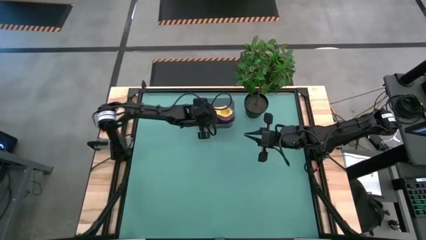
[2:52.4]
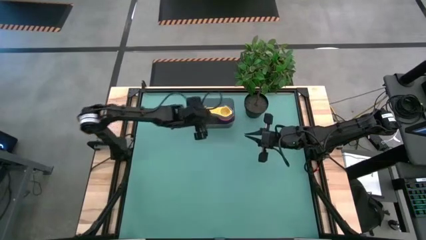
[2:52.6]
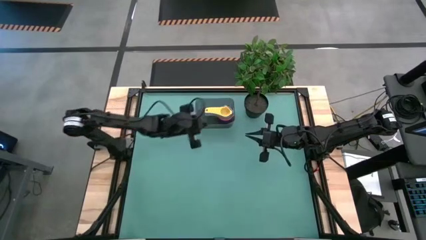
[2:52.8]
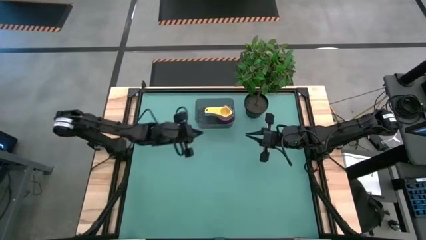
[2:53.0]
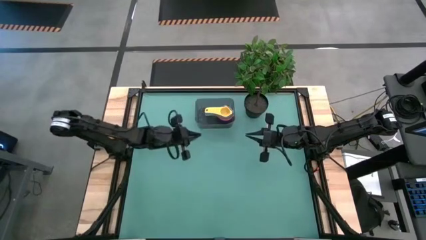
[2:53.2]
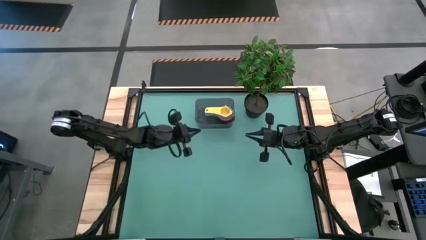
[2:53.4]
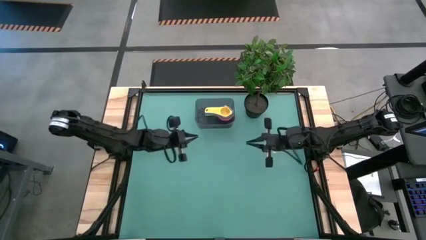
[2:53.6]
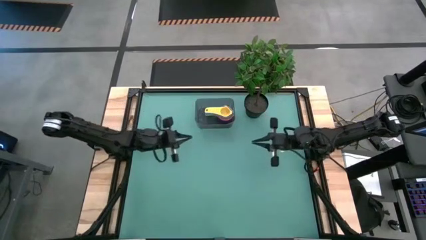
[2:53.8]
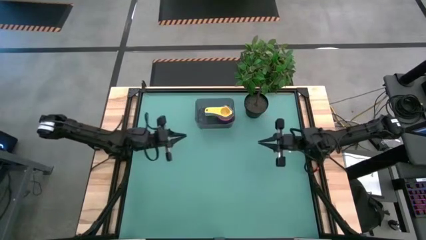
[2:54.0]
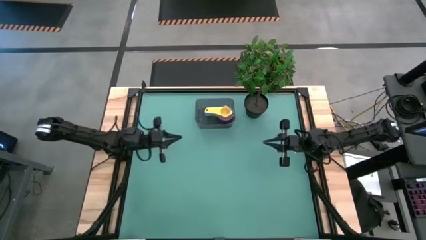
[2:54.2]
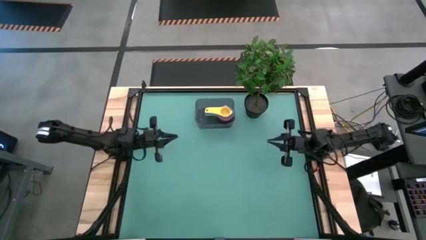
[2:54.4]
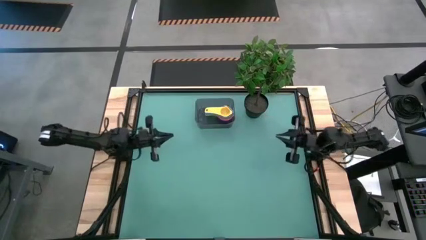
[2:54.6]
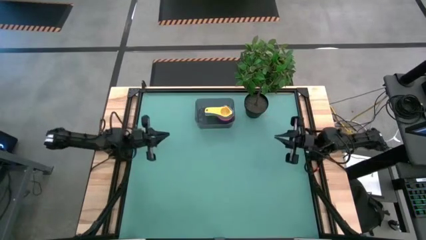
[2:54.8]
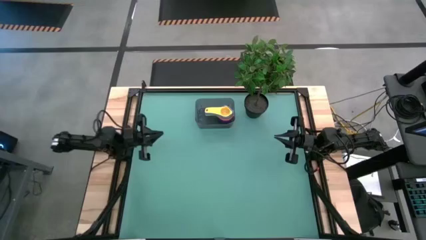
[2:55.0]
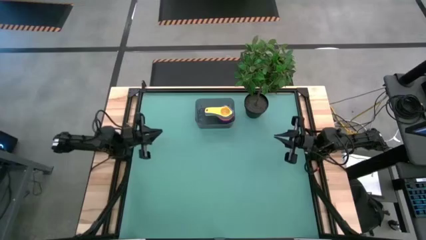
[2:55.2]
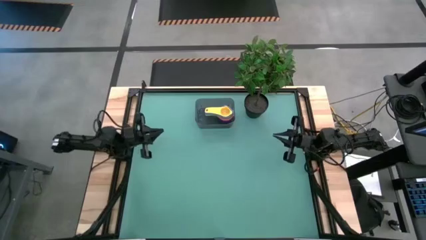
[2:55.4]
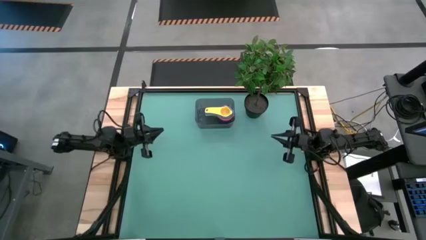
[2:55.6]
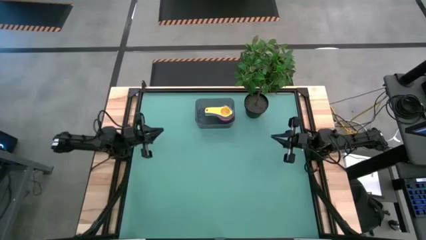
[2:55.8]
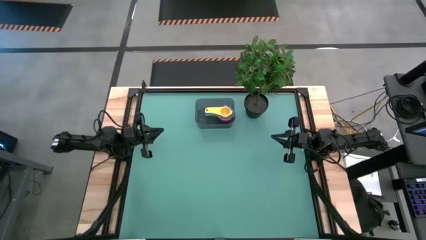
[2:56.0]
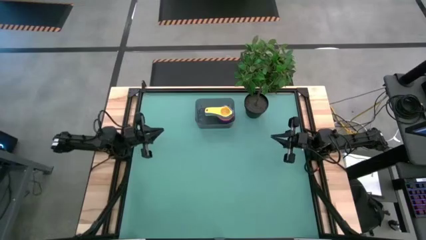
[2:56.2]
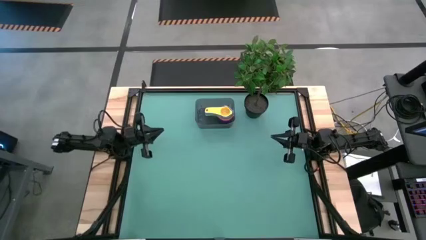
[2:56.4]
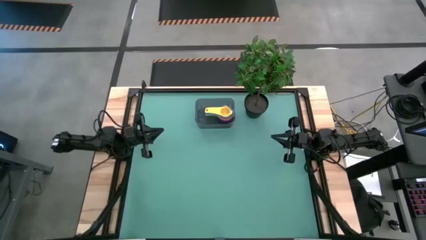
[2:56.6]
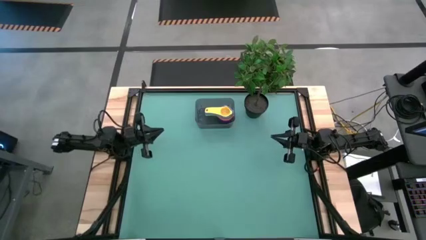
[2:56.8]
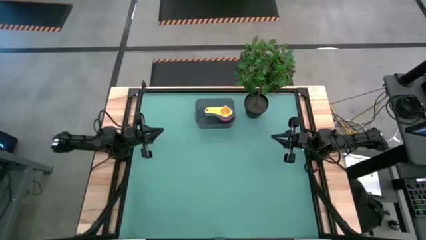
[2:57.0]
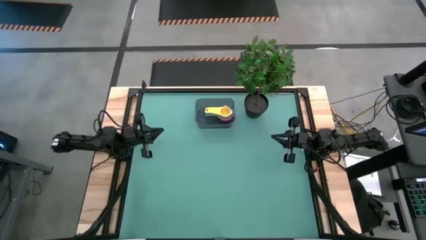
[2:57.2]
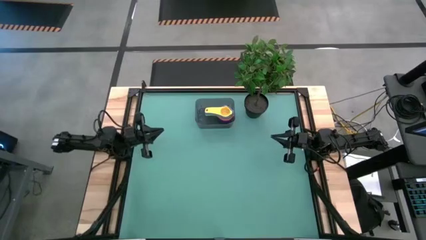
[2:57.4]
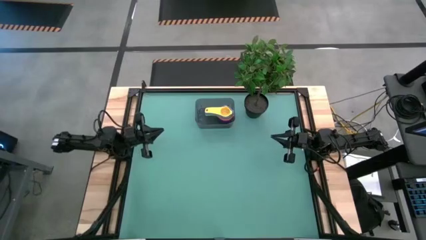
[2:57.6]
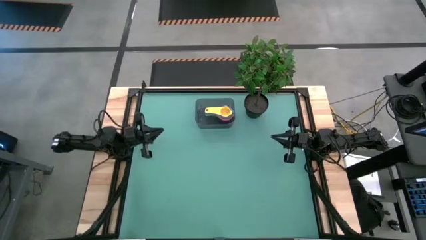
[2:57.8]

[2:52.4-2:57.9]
Task: Nest measuring cups in basket
Return to Home Position

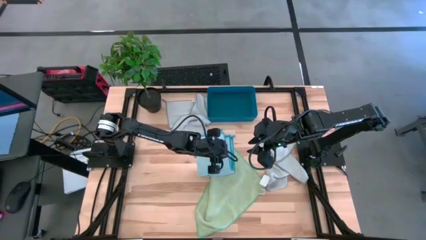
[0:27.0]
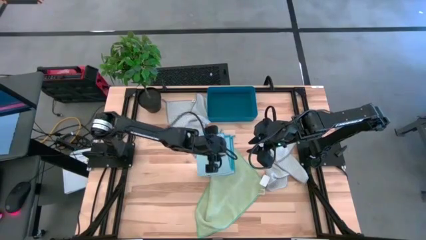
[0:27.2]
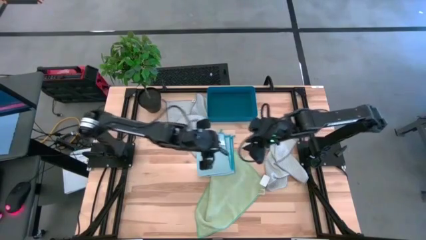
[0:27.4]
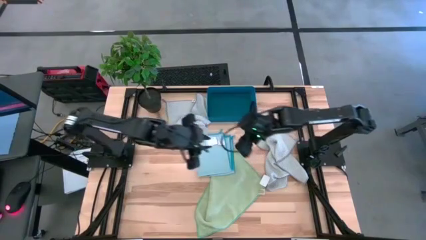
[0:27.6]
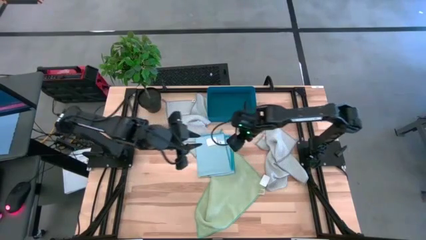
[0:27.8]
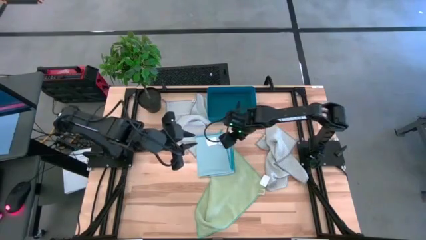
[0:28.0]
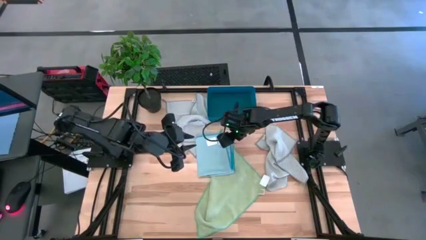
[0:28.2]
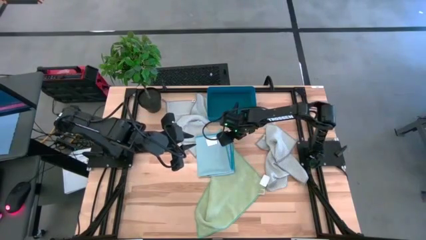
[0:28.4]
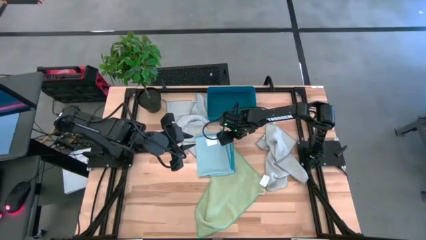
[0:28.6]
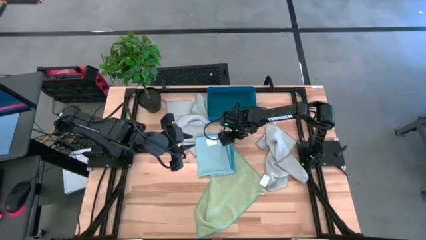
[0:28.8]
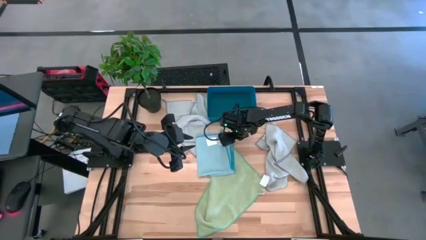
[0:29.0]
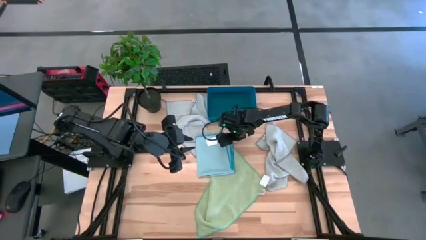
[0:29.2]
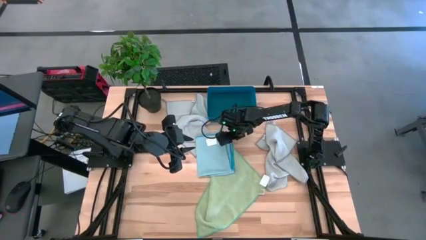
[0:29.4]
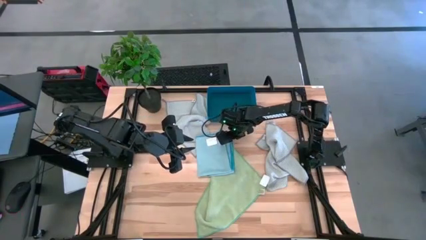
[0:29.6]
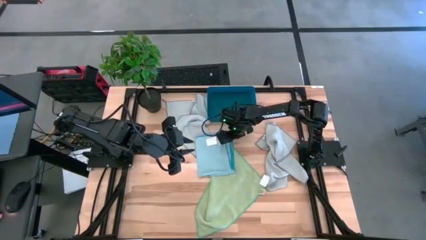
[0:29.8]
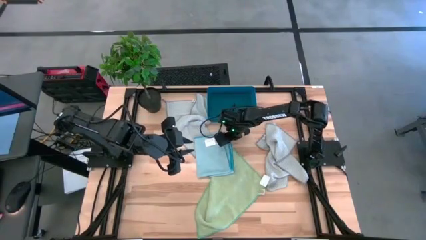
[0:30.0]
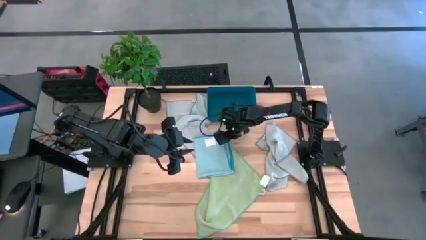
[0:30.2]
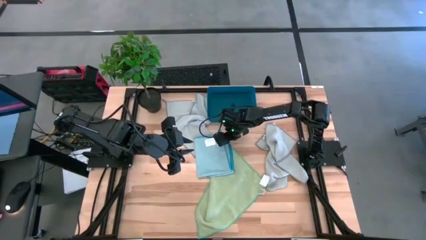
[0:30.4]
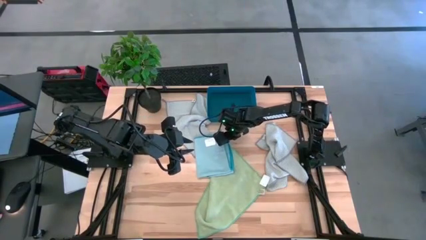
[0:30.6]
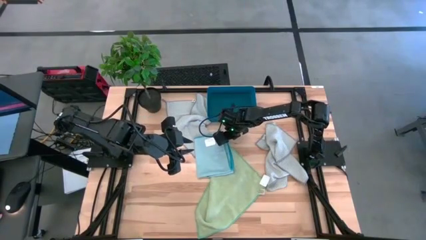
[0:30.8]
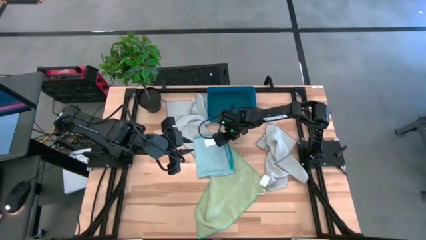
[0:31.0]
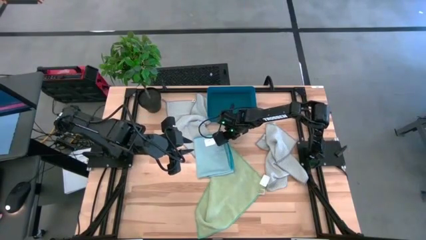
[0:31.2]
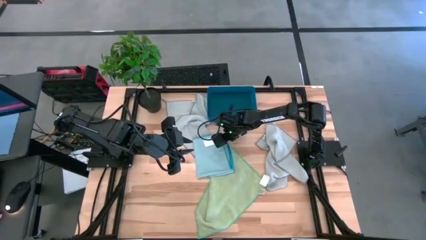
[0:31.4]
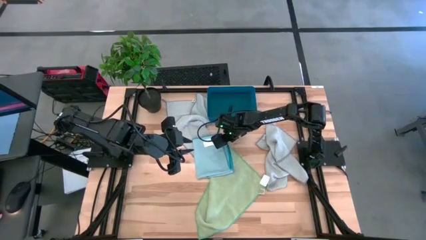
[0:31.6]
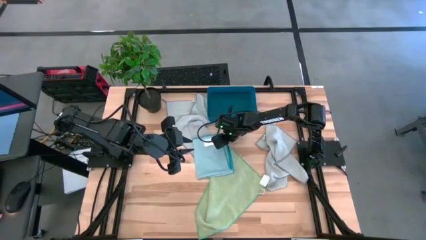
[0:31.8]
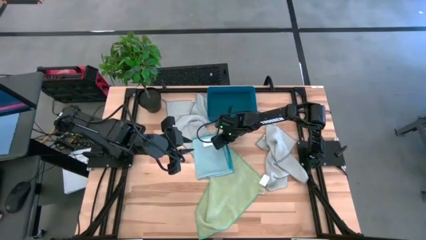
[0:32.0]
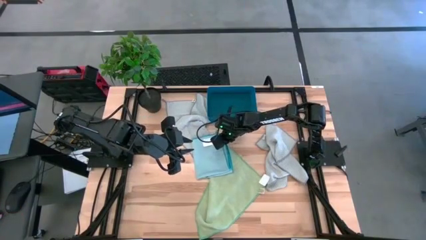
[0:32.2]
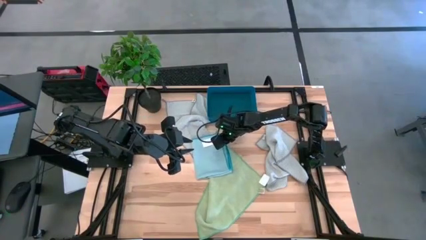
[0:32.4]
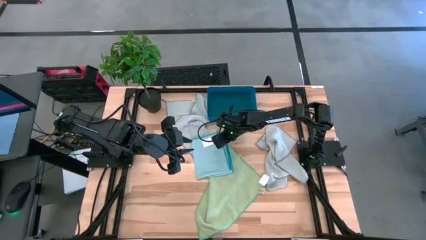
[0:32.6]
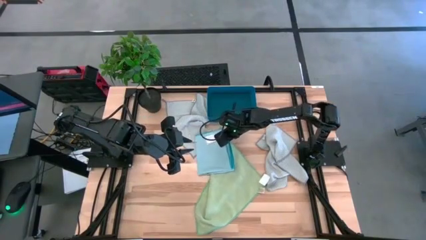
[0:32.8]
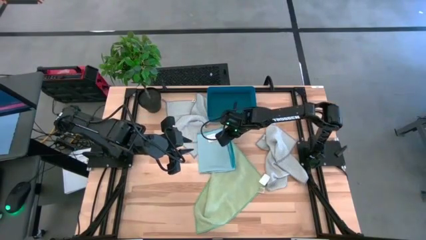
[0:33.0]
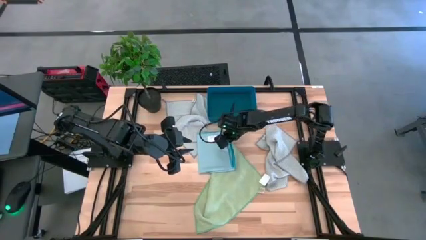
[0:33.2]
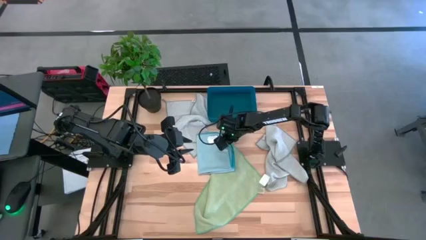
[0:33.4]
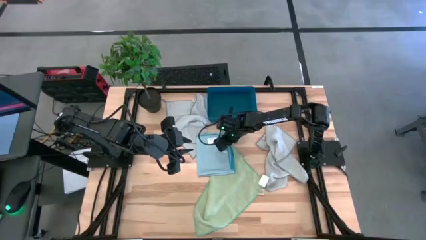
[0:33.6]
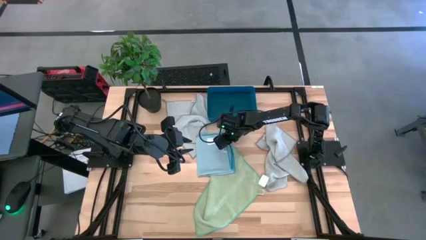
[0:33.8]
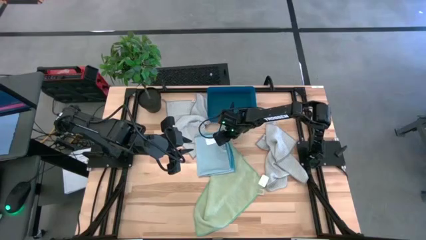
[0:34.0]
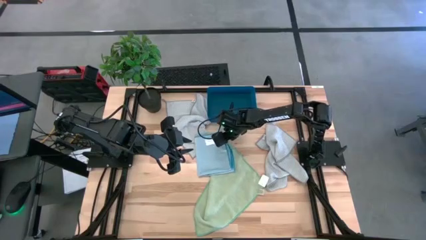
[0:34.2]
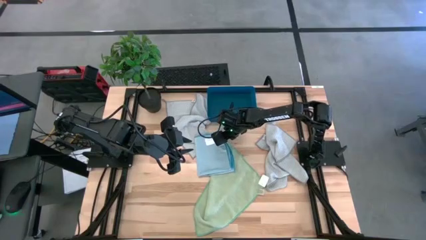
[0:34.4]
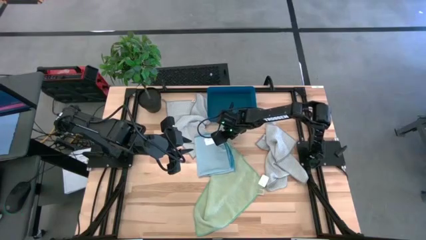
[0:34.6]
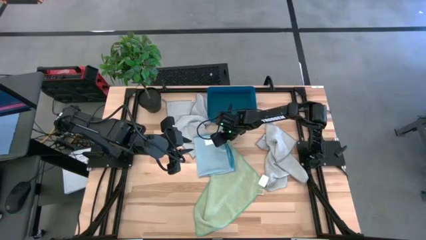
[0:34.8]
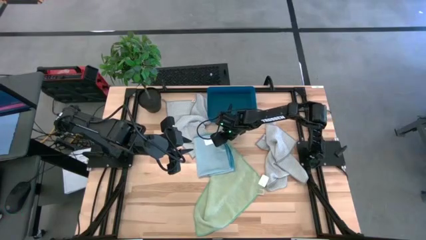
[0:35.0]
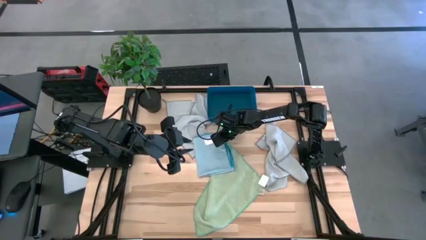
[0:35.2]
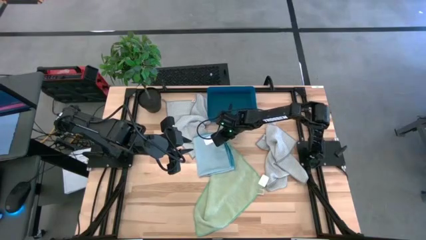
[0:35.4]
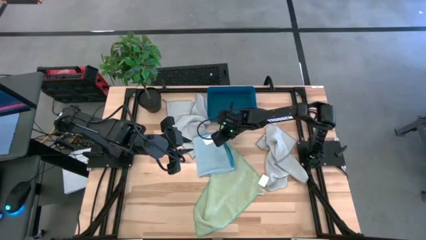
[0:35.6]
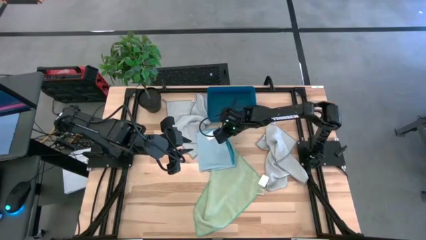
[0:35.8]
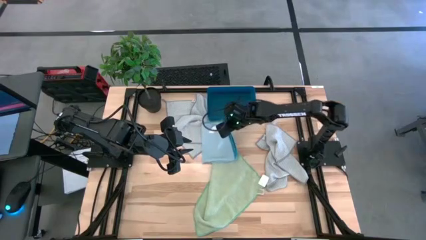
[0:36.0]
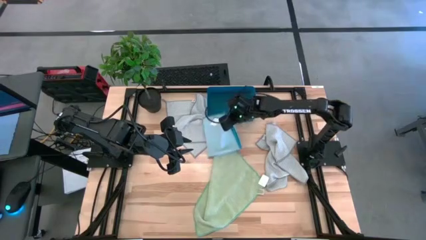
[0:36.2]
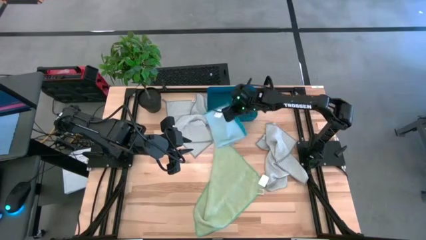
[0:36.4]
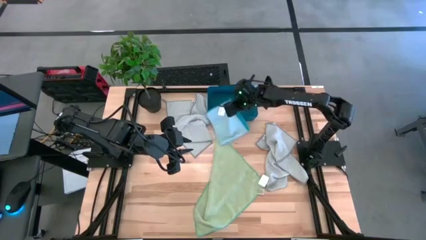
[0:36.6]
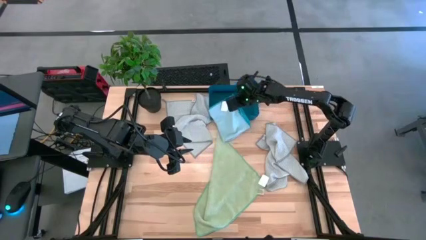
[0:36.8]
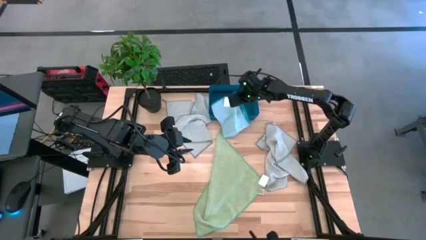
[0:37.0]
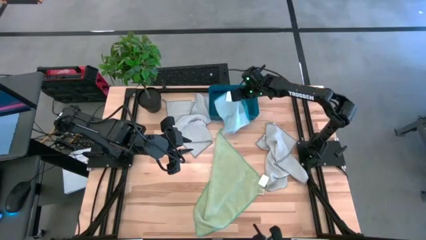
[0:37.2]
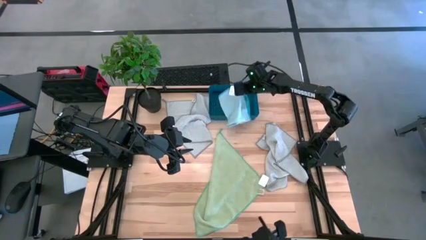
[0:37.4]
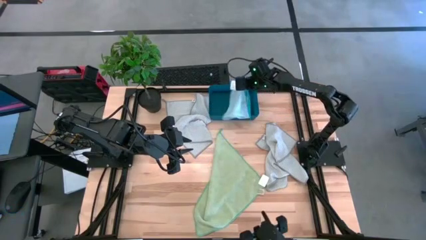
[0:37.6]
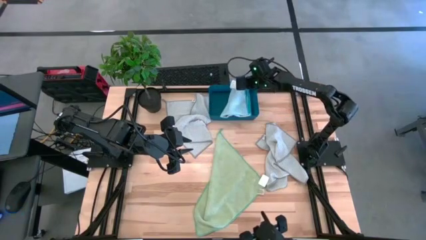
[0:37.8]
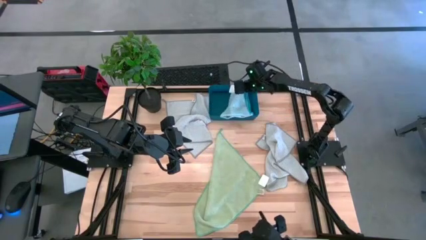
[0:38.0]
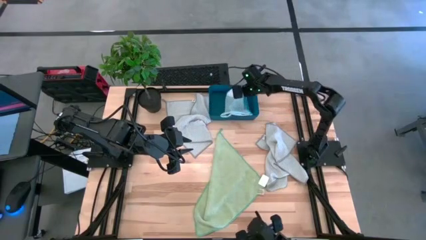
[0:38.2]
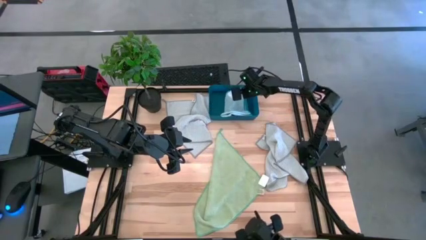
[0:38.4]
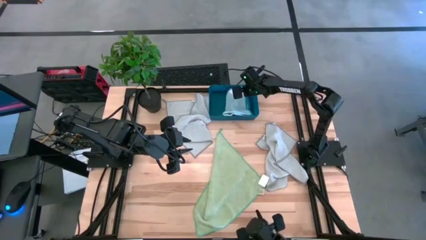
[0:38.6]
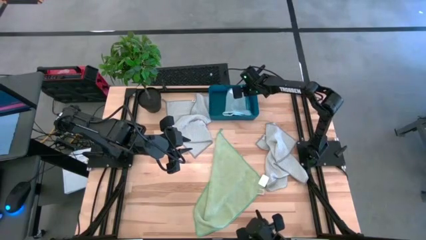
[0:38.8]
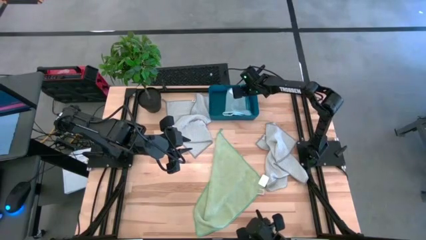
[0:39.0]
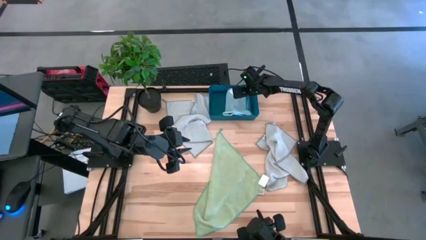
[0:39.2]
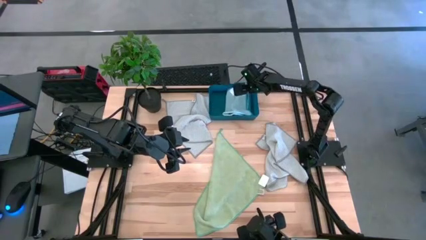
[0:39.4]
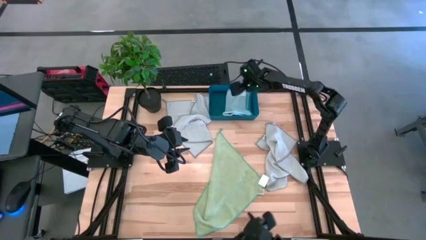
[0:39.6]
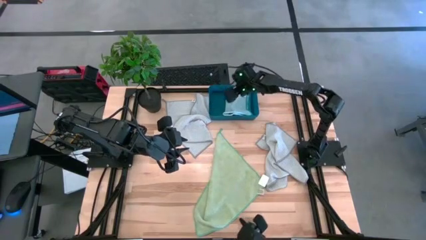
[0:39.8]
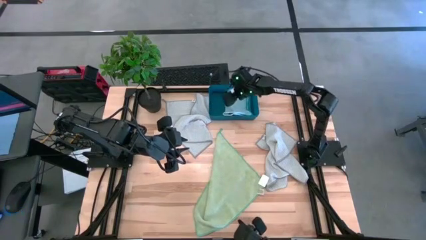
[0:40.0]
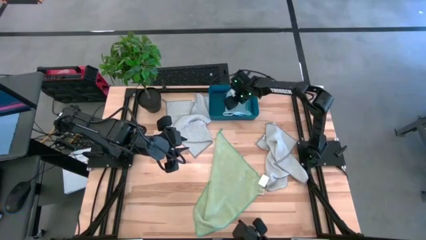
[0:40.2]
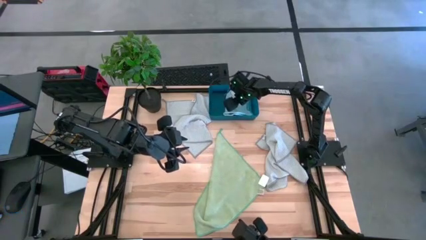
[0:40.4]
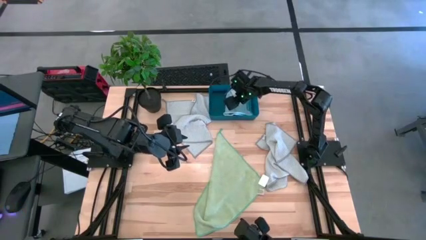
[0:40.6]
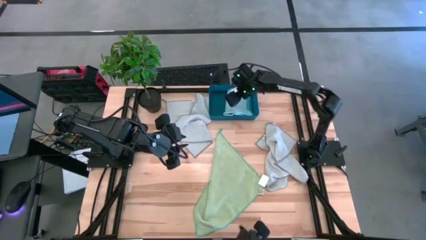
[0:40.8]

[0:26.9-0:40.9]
Task: Fold microfiber towels
Put the blue towel into the blue bin
